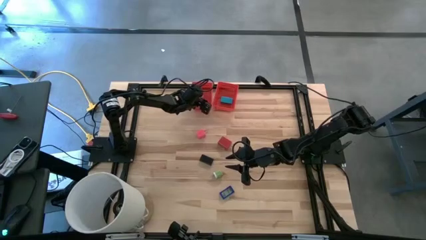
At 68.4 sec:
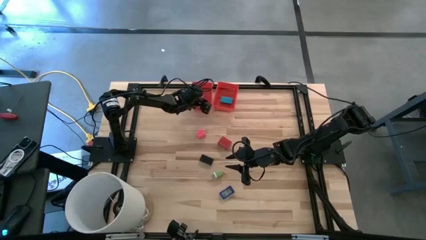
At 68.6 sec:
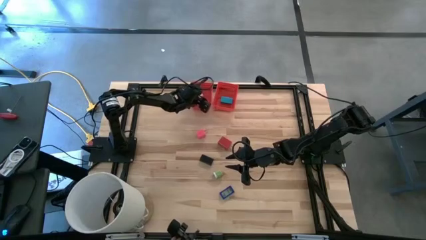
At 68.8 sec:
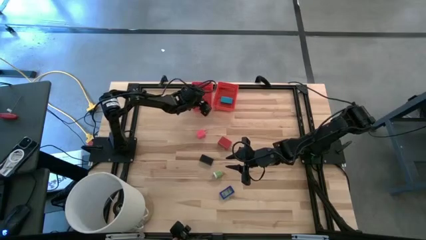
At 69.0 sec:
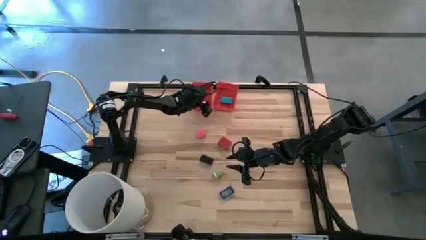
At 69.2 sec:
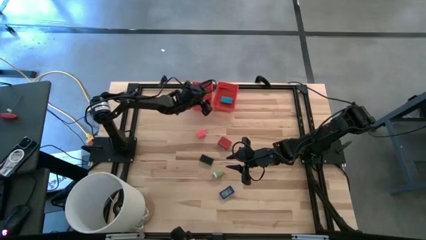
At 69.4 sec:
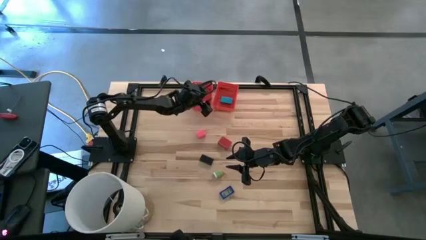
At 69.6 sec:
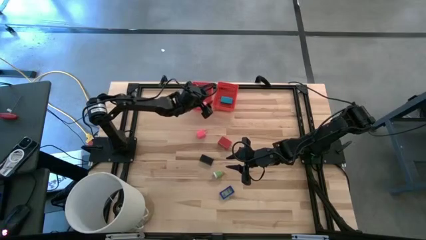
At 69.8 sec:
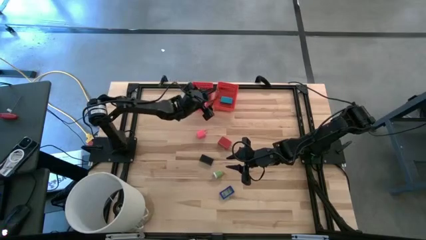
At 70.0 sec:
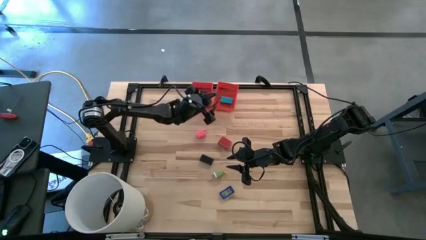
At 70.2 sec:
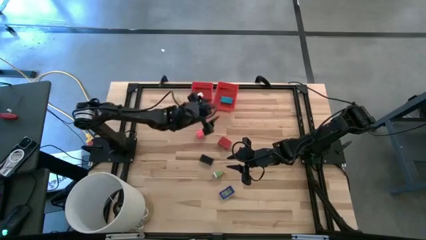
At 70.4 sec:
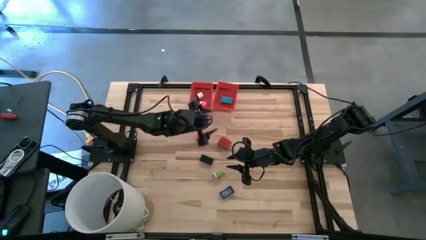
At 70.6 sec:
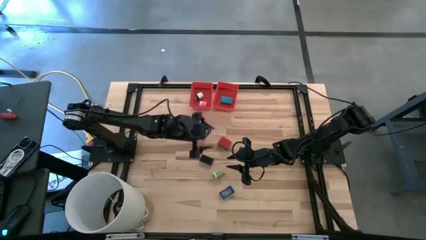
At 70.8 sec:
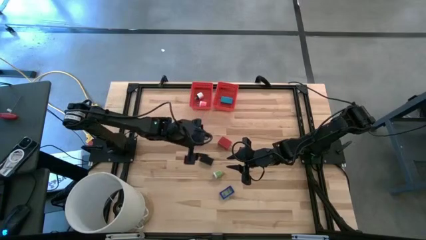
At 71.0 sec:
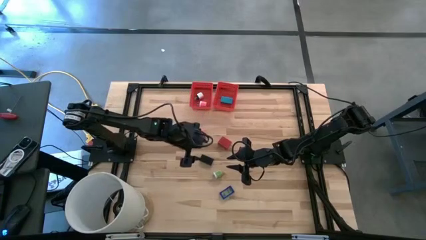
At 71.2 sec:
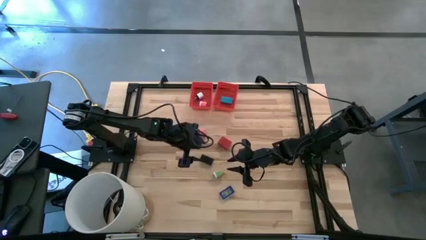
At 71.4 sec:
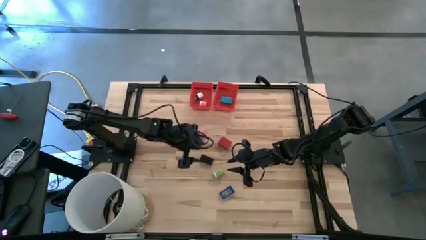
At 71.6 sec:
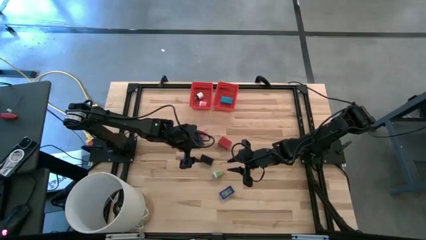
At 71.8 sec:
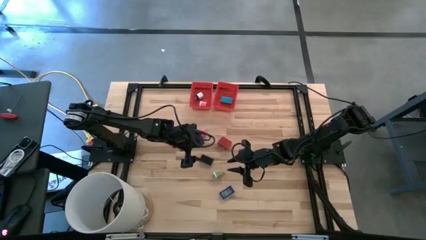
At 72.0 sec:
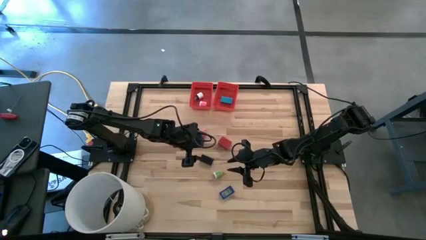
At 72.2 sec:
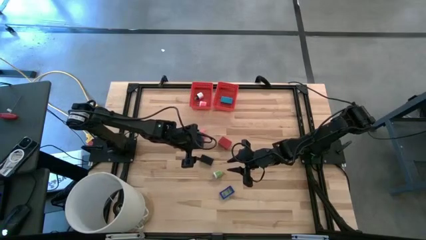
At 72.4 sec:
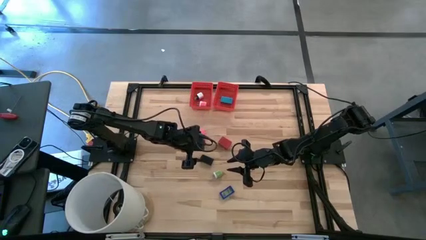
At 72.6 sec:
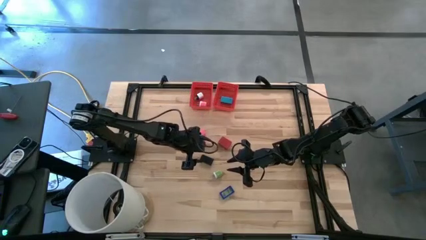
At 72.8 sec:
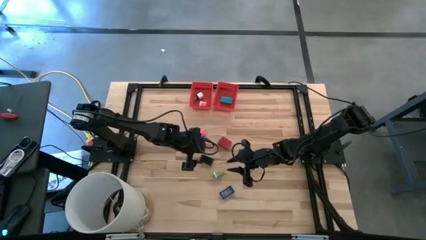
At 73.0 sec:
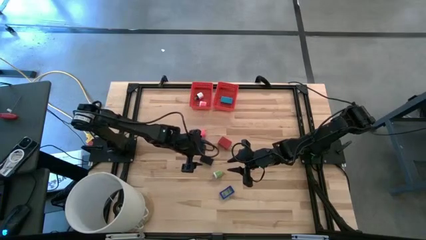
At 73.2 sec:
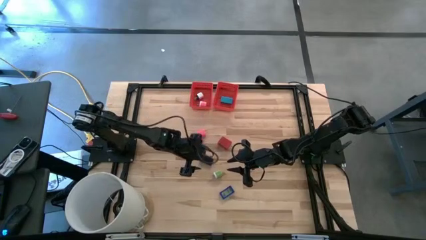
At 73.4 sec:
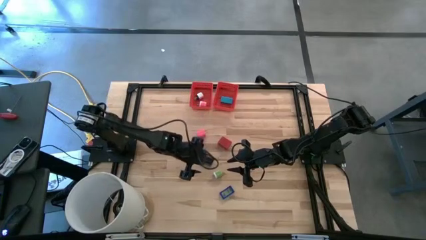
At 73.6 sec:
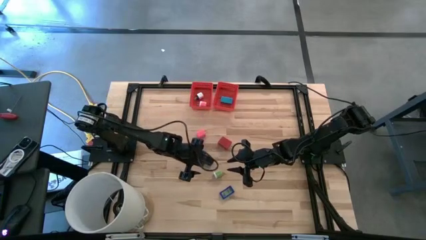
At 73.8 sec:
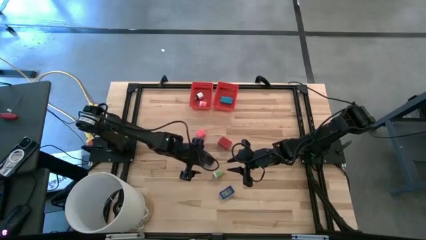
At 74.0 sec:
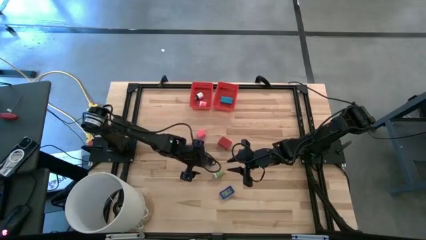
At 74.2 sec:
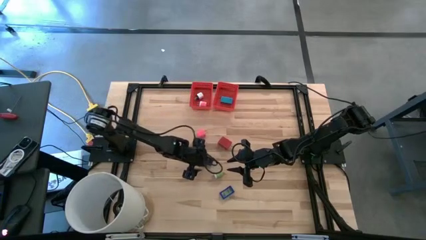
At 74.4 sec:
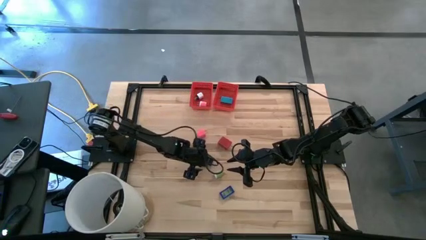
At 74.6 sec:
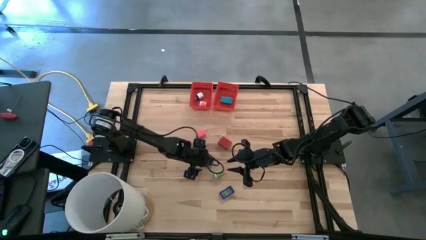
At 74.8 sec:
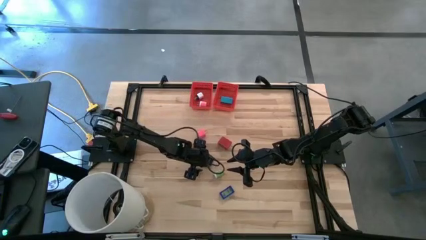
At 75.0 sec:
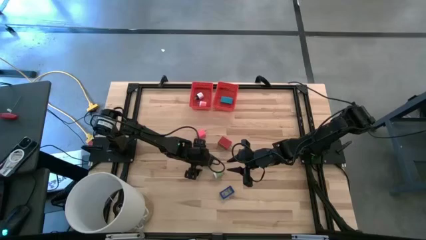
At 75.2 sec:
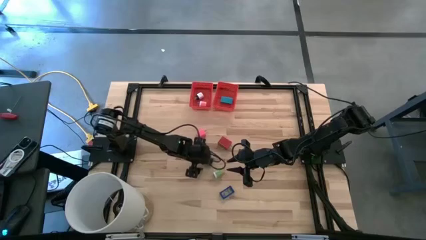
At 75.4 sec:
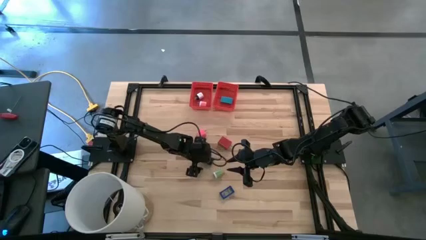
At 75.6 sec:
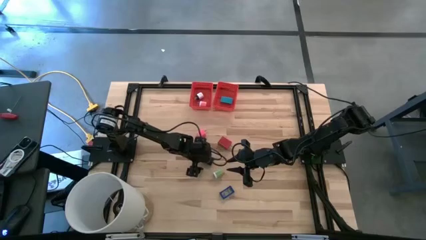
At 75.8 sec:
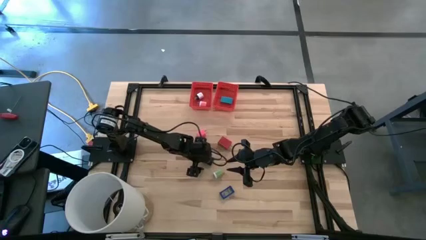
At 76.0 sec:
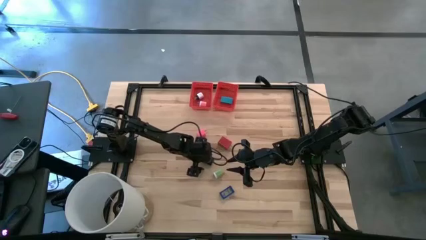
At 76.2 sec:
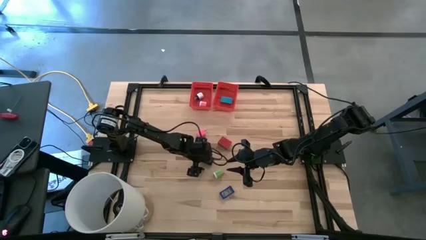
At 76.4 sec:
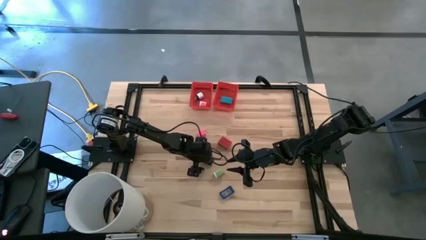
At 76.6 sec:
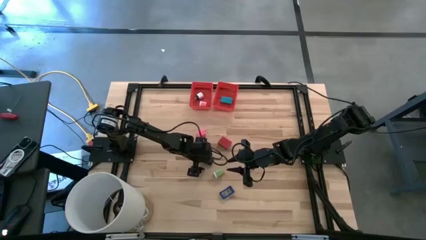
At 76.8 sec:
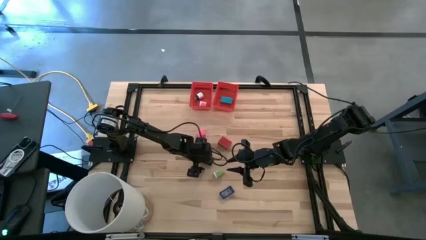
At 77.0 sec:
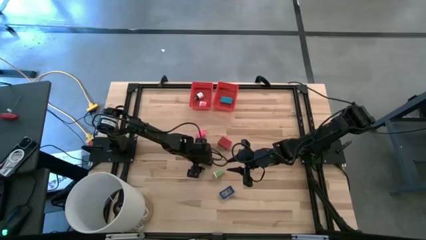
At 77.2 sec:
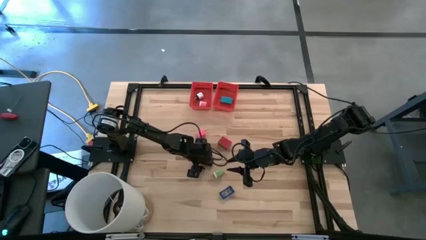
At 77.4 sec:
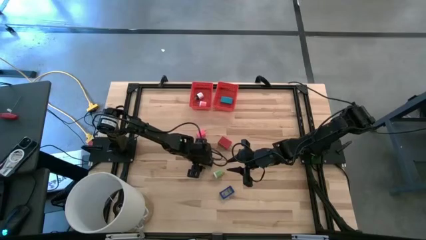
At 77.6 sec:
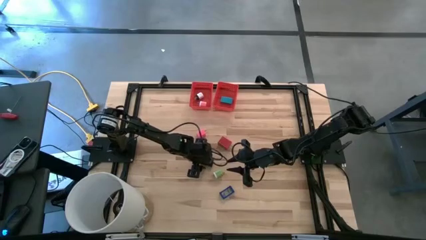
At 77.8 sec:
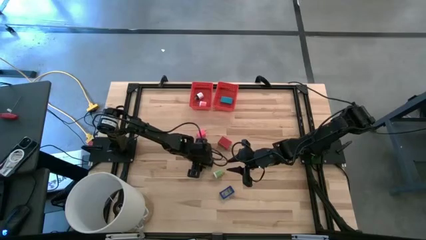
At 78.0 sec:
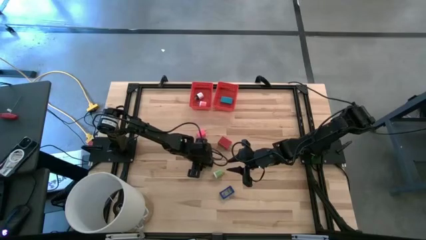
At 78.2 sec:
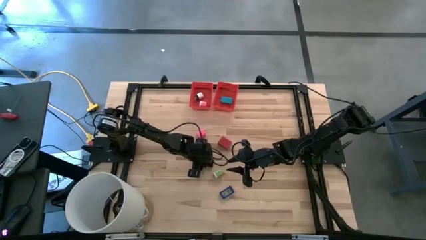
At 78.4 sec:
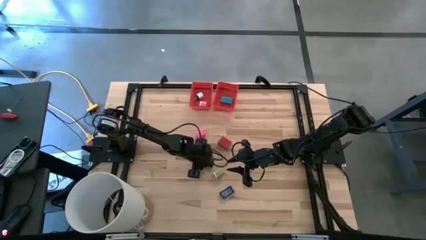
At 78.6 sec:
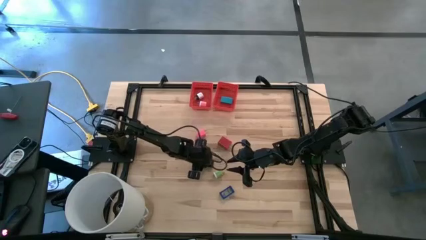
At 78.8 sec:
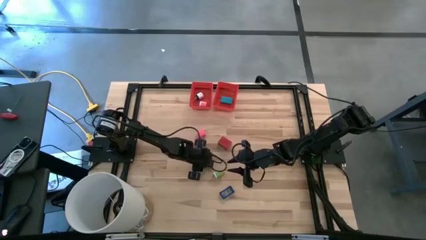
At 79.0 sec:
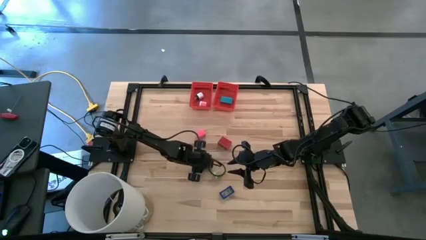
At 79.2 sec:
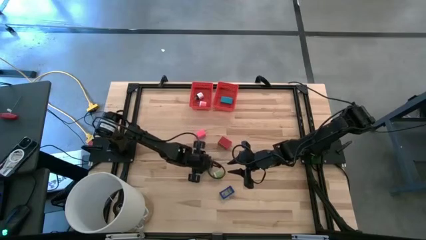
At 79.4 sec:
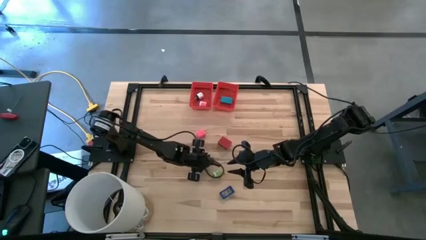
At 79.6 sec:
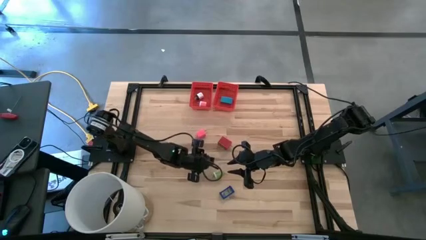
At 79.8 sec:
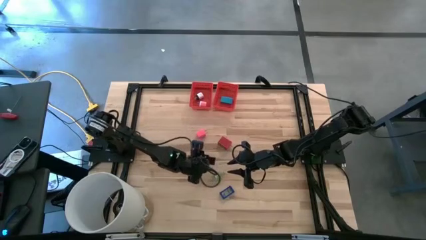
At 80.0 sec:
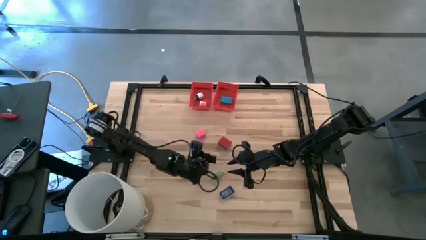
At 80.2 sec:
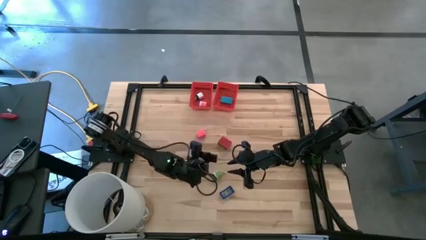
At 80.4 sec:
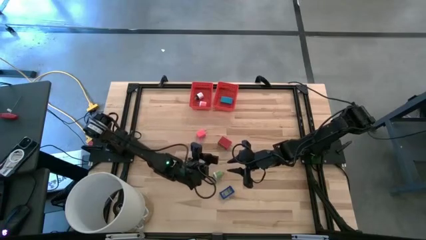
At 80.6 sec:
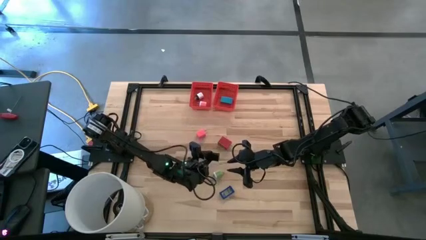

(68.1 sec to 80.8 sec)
Task: Pick & Place Office items
Put the black digital clock into the right red basket

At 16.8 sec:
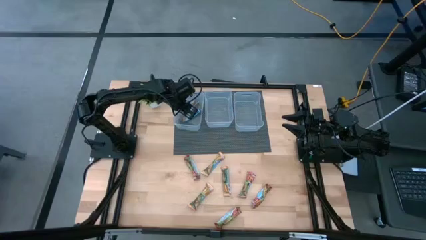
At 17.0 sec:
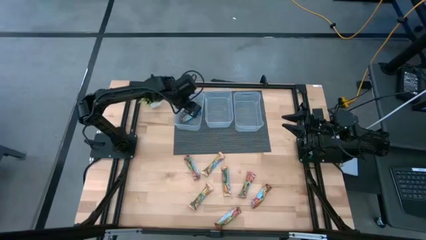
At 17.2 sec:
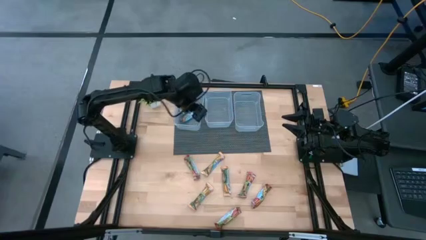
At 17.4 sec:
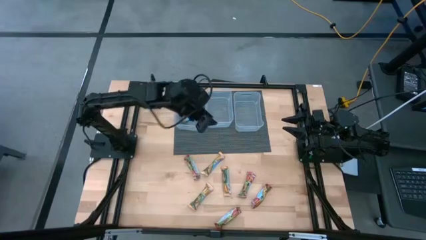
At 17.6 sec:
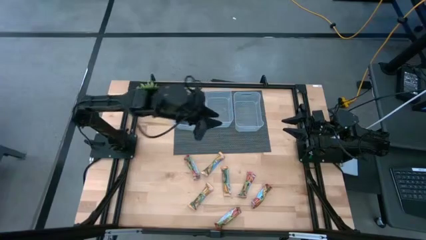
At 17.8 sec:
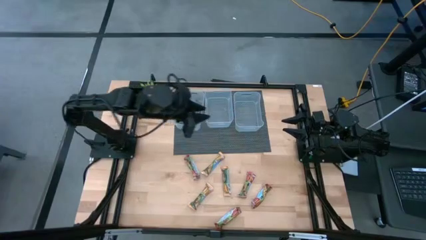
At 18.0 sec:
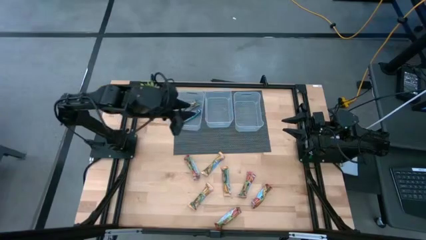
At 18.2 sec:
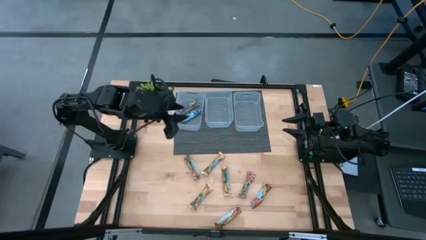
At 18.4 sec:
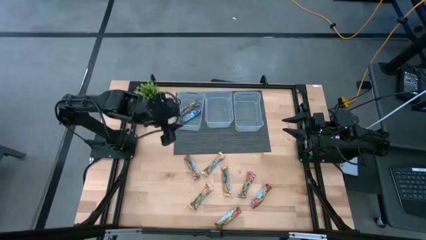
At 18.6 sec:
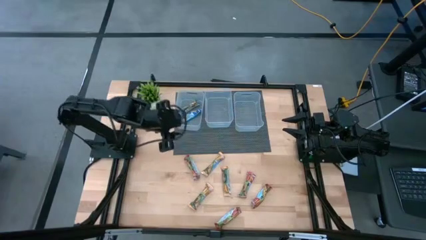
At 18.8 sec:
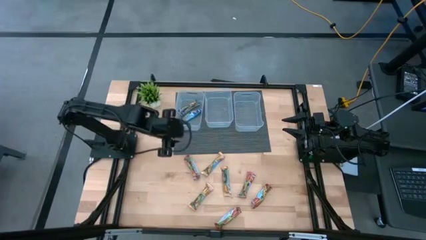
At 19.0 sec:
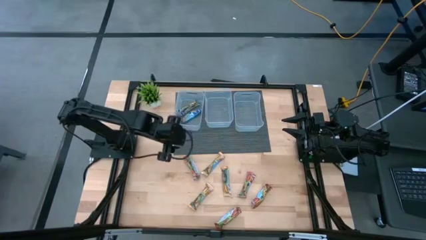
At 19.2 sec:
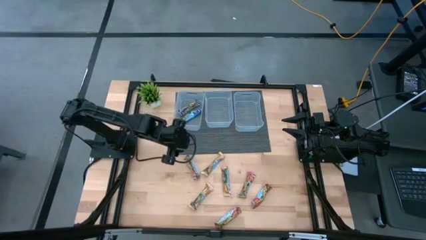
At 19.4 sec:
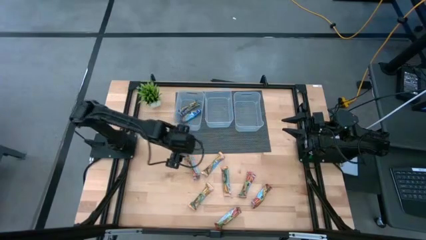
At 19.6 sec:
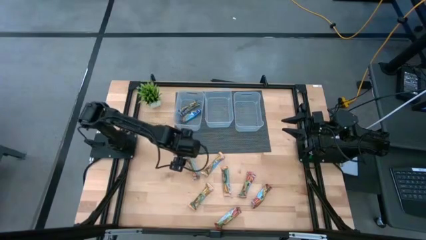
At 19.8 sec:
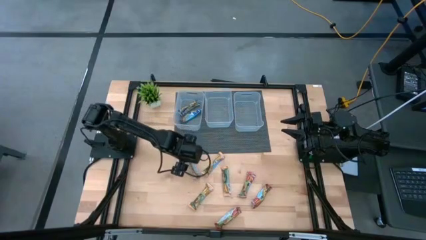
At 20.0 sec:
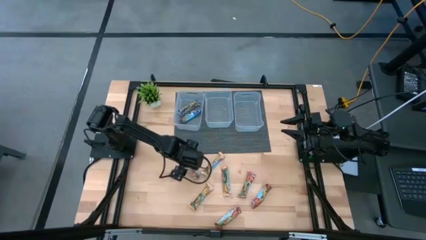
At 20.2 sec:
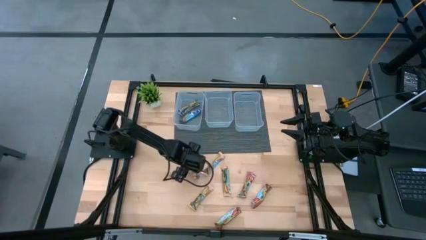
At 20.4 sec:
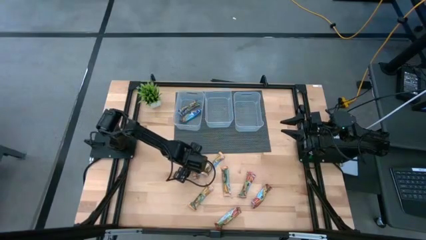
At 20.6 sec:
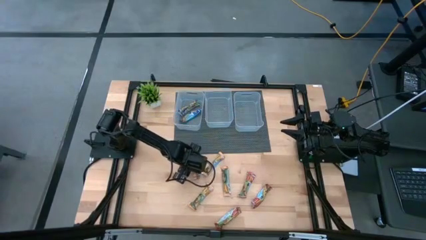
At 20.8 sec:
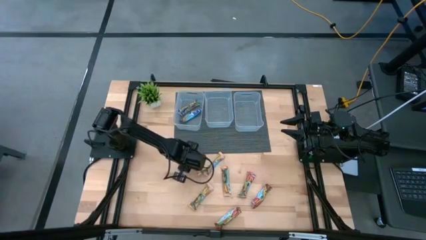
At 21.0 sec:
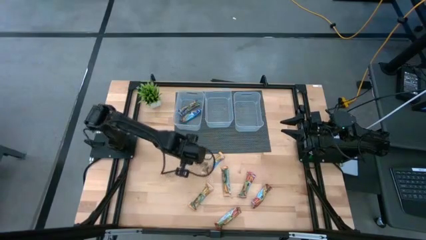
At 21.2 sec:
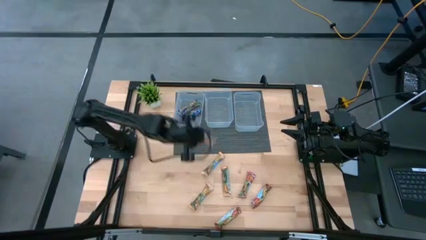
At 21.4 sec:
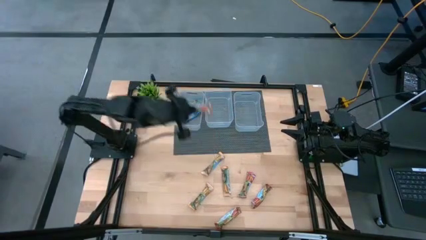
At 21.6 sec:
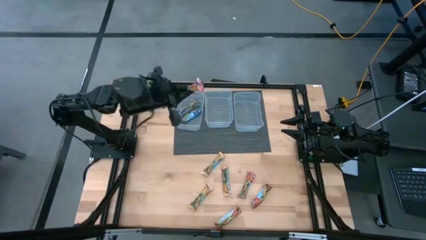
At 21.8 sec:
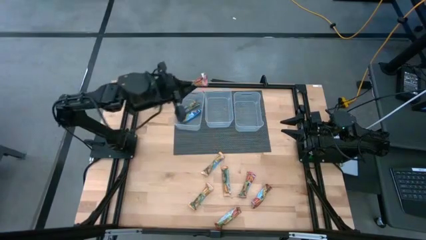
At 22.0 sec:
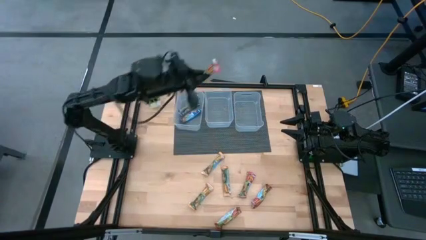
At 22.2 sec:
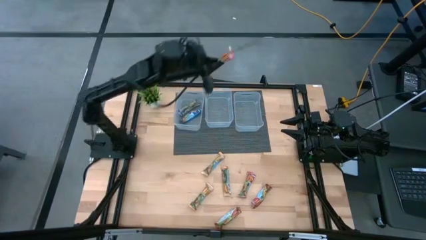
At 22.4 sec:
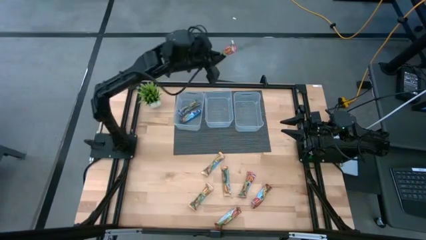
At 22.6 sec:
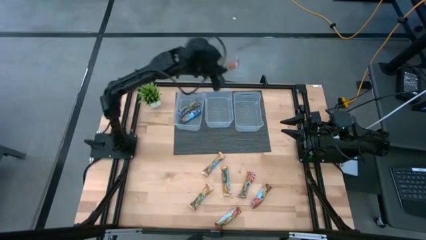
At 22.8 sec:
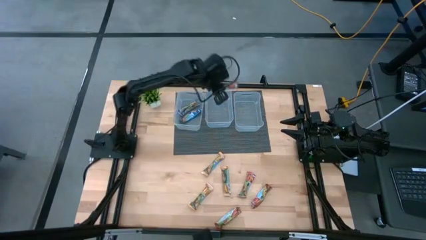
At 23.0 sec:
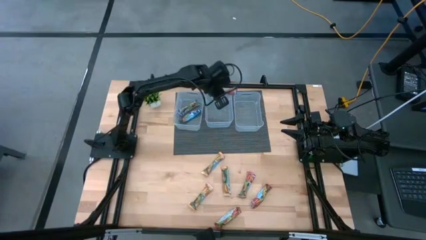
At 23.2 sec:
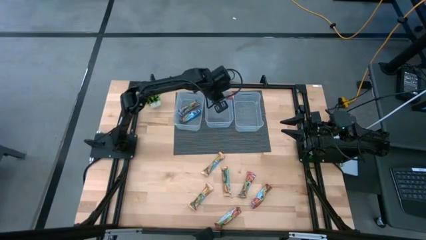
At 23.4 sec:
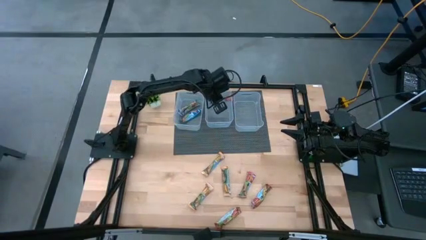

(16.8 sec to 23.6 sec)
Task: Pick and place Granola Bars by type
Put the red granola bar into the middle transparent bin
